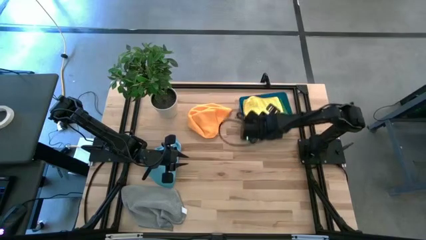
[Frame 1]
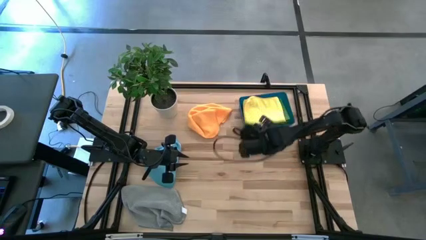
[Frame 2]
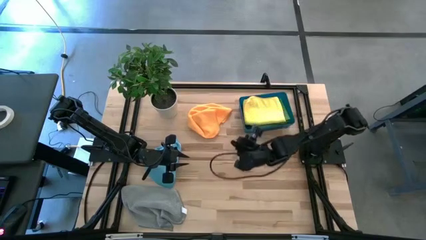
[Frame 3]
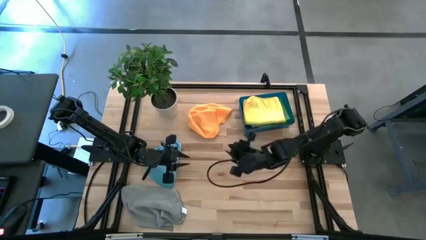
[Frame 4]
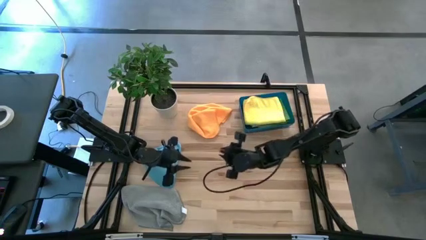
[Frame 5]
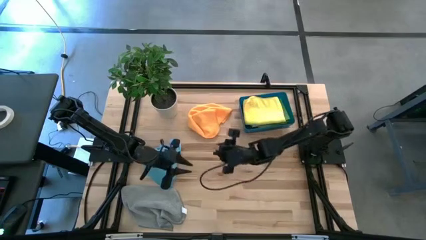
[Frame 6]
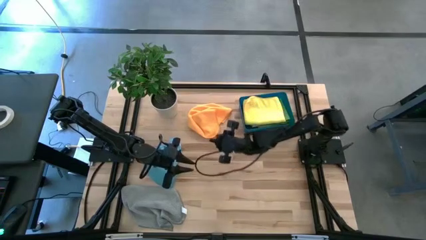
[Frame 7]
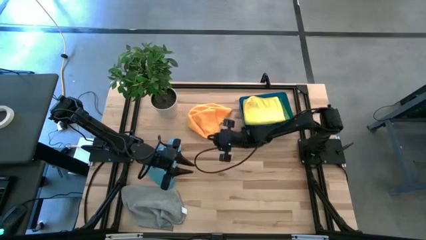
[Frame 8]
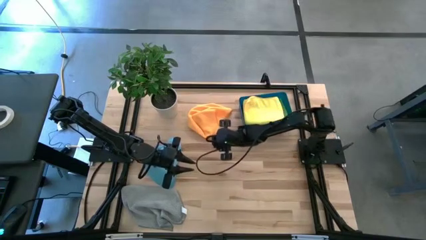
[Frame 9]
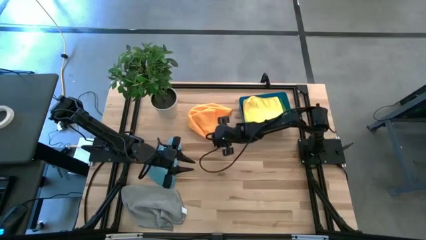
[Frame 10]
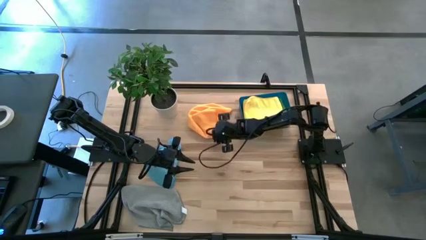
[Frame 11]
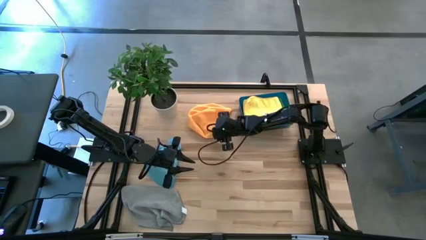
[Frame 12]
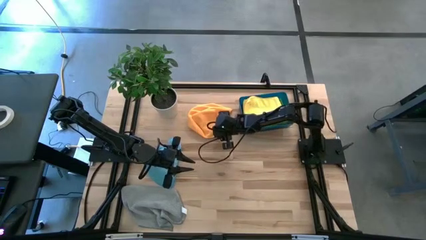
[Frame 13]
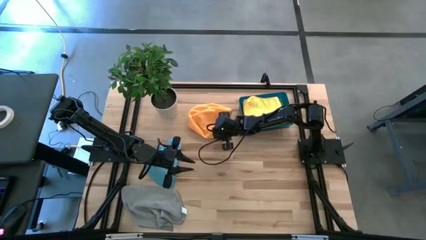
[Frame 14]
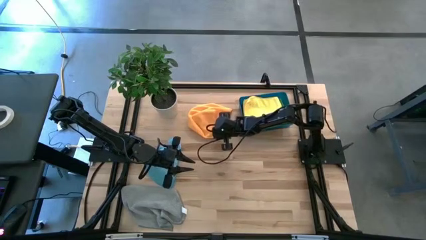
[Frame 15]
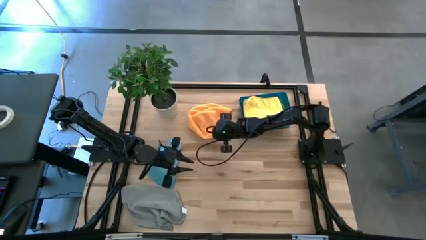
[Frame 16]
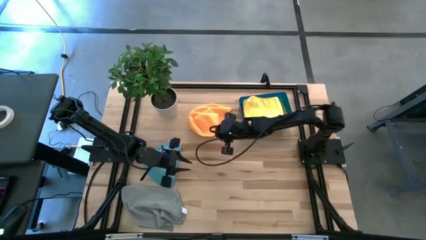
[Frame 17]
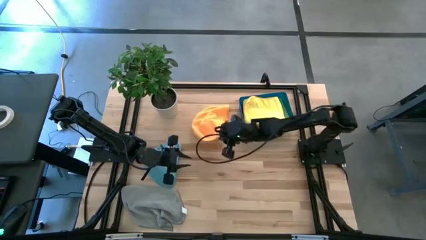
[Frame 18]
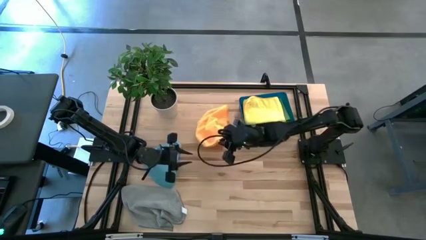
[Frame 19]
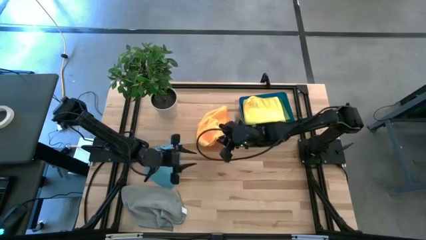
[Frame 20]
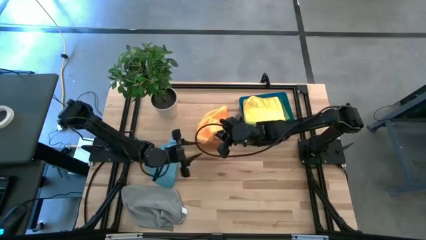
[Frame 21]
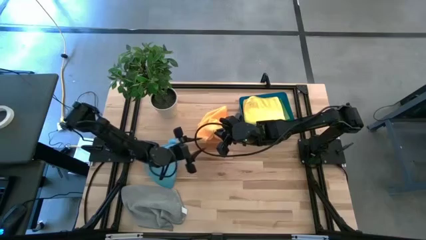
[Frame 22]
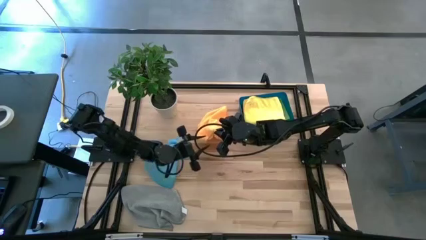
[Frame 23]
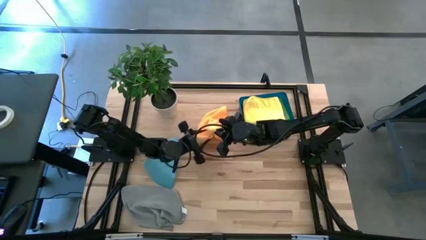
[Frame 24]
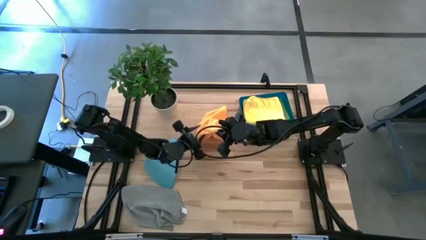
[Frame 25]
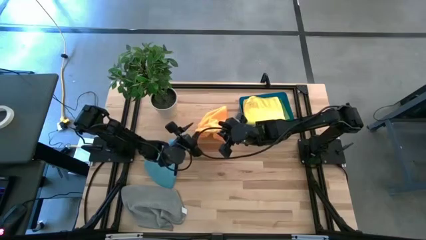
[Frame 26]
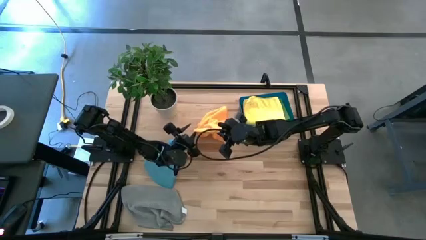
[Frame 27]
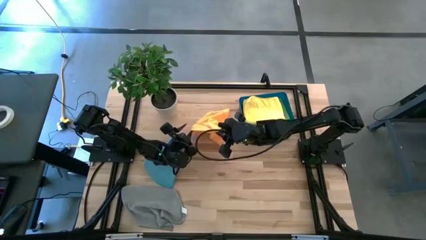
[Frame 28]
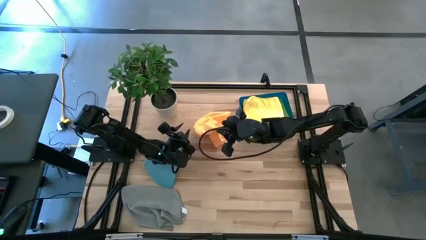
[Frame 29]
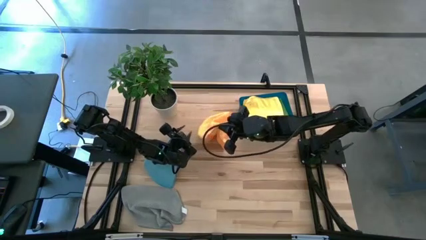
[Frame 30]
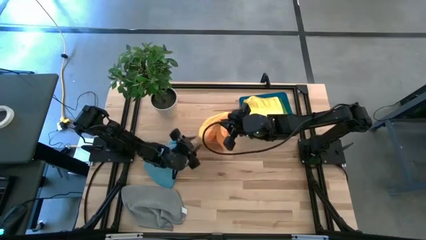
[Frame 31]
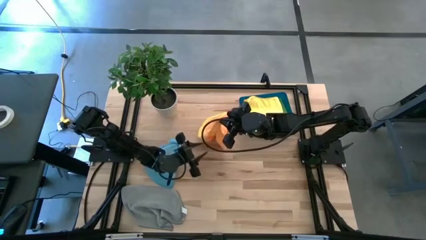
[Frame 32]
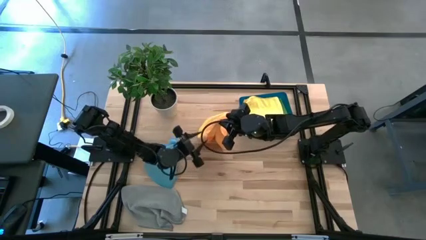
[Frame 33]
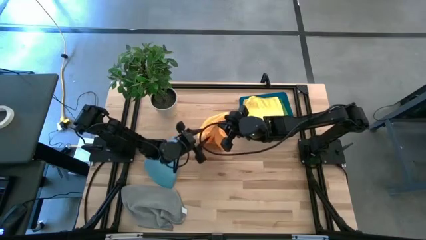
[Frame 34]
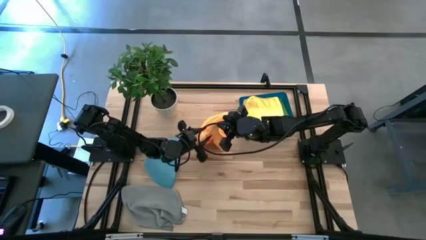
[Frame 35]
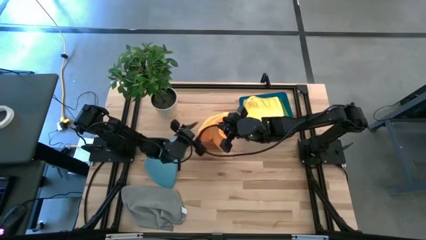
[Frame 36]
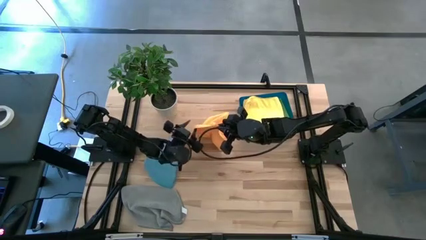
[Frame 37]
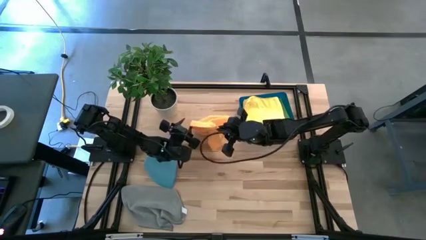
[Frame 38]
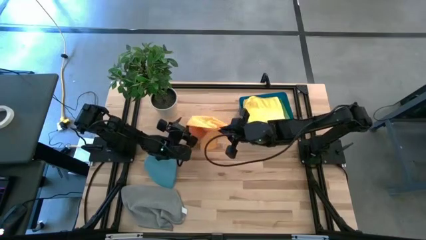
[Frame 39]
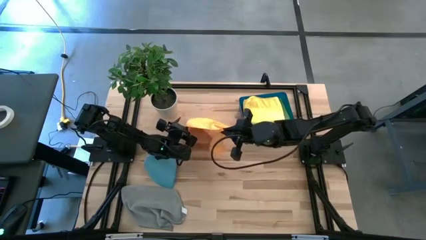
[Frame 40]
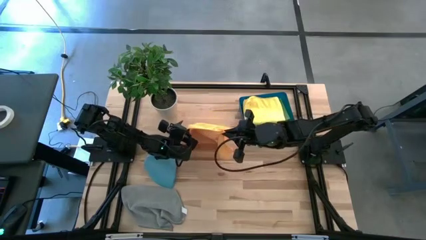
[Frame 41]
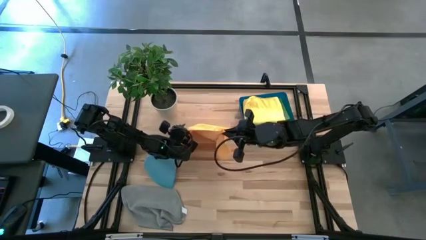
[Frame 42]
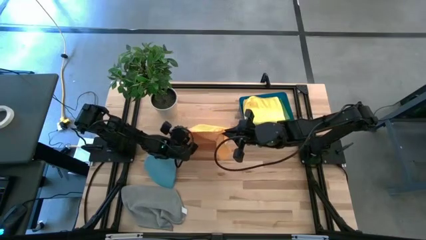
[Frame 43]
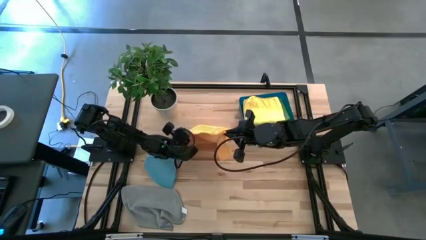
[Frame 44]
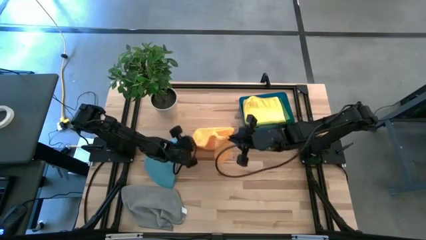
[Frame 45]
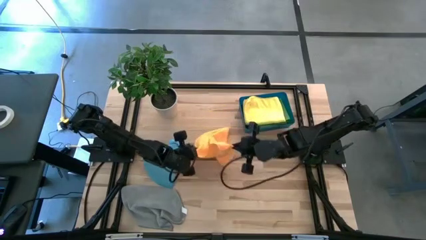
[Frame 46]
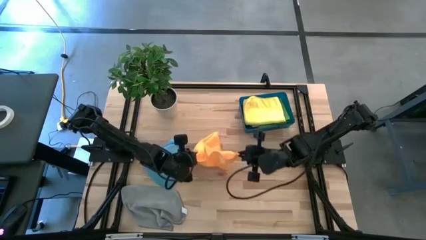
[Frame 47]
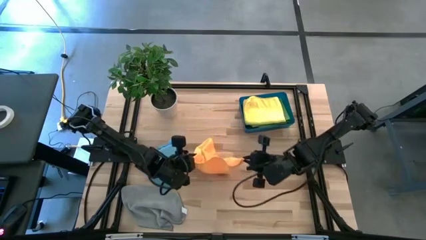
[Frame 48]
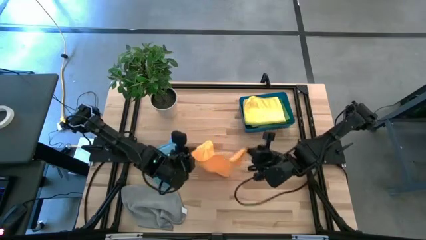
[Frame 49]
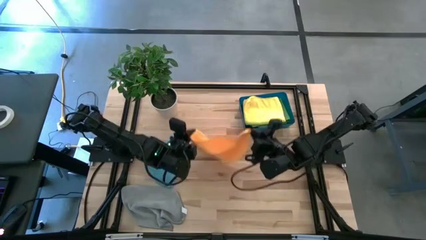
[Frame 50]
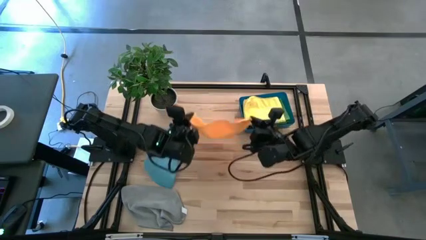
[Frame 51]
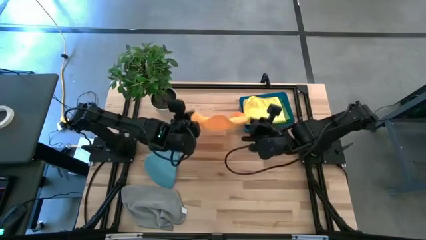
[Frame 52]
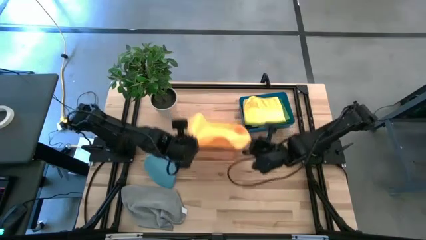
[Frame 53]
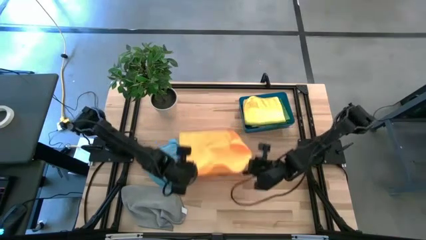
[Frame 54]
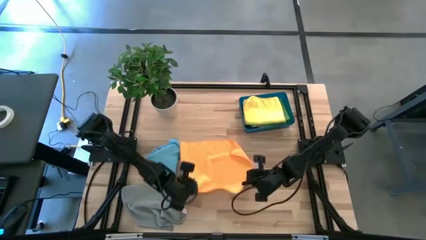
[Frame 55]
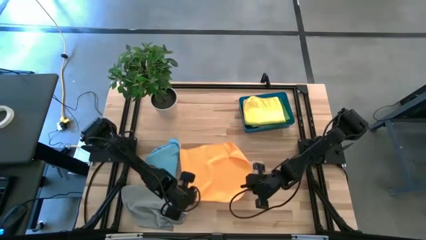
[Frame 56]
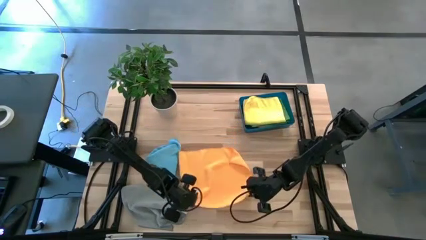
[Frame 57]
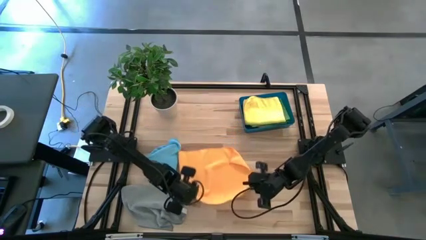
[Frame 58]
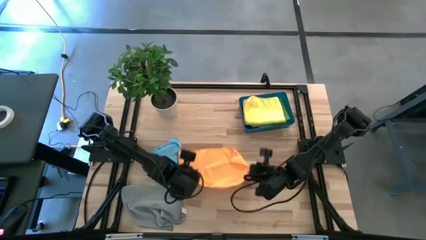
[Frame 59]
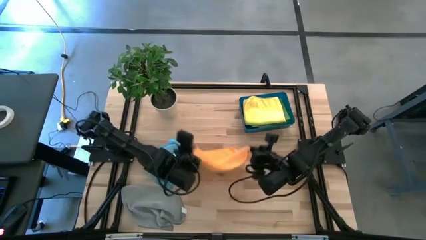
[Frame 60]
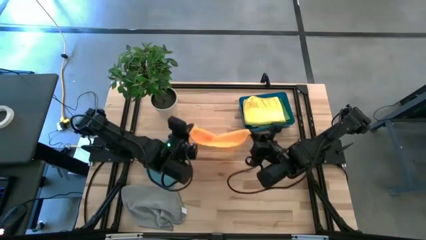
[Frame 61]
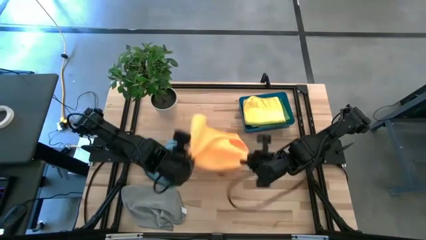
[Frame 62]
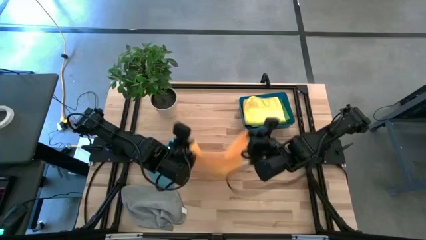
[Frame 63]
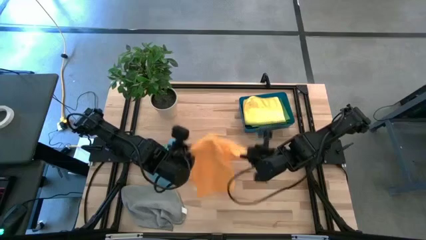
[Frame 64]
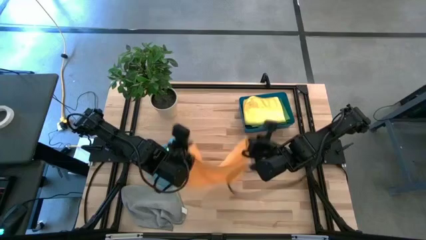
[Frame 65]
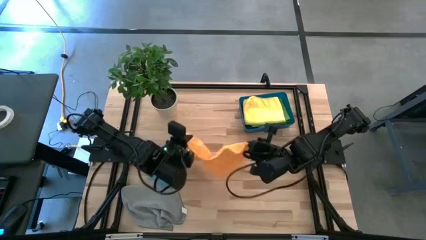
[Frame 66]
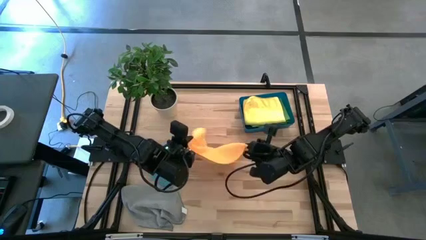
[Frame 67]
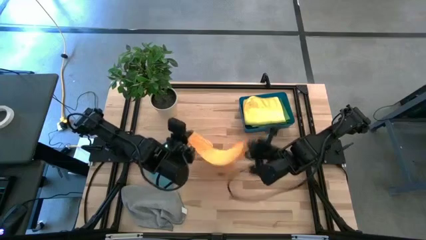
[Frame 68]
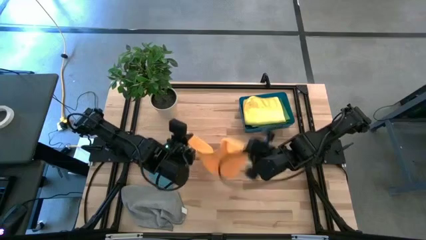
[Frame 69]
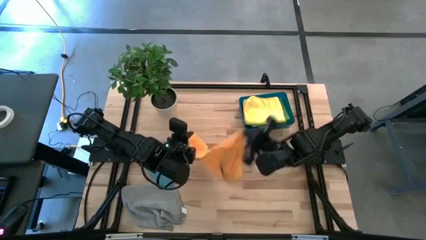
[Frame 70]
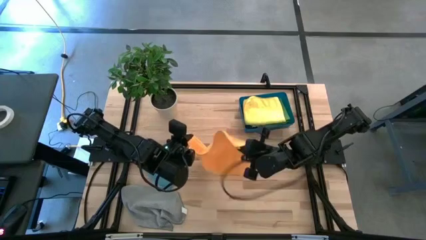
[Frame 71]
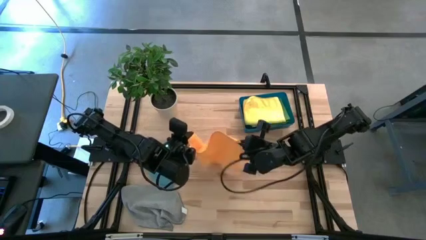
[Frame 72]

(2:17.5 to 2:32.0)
Task: Fold microfiber towels
Fold the orange microfiber cloth

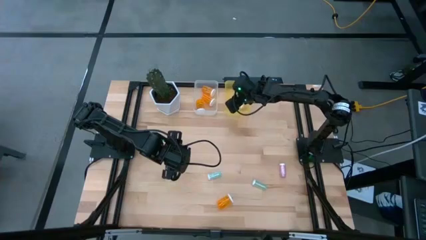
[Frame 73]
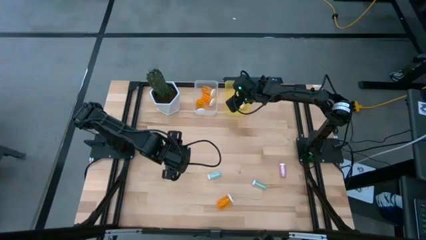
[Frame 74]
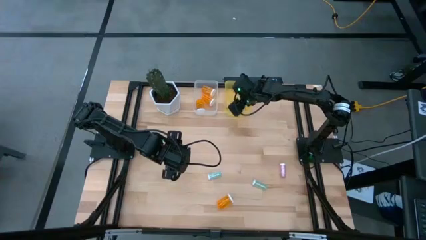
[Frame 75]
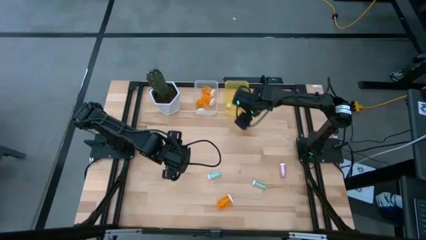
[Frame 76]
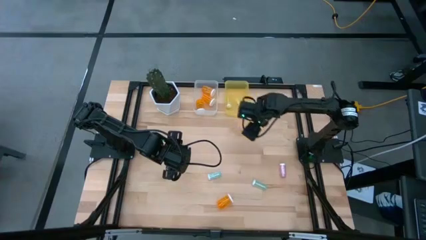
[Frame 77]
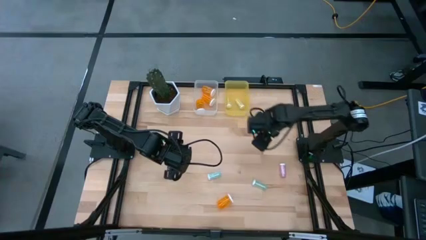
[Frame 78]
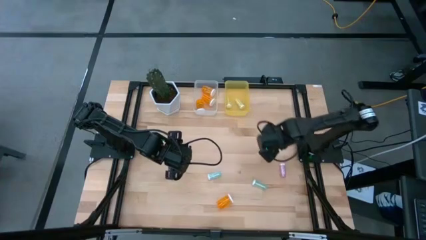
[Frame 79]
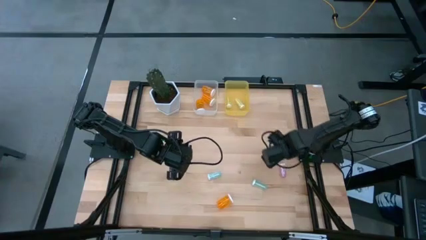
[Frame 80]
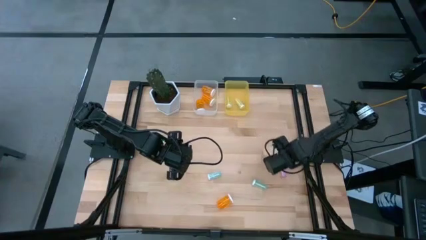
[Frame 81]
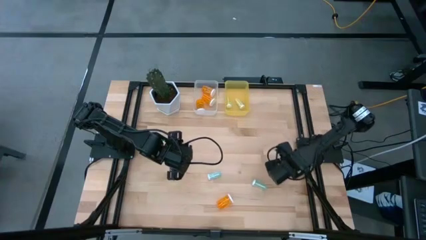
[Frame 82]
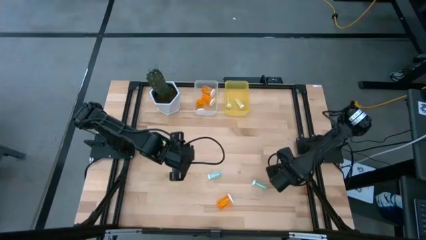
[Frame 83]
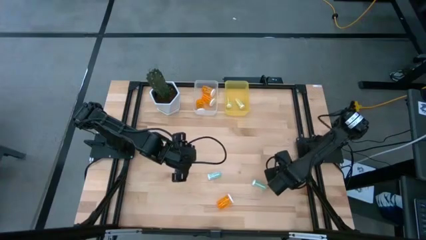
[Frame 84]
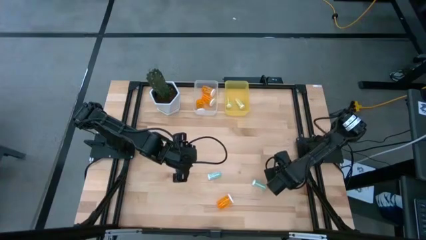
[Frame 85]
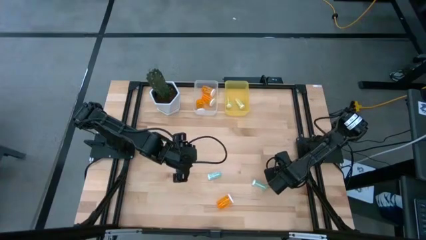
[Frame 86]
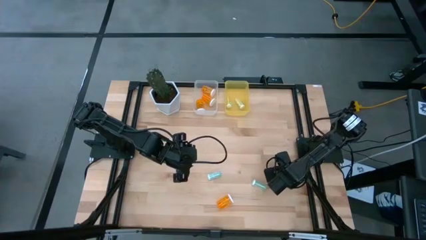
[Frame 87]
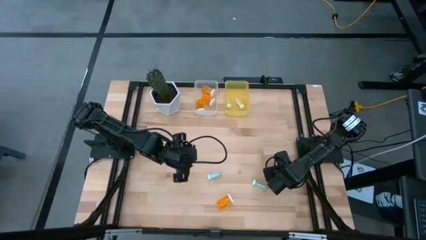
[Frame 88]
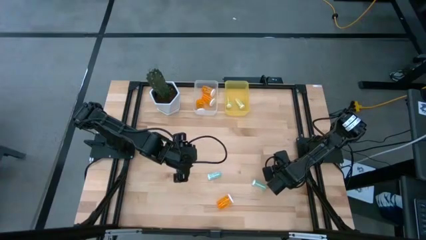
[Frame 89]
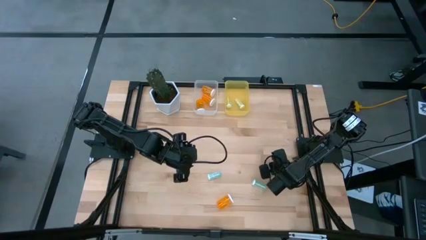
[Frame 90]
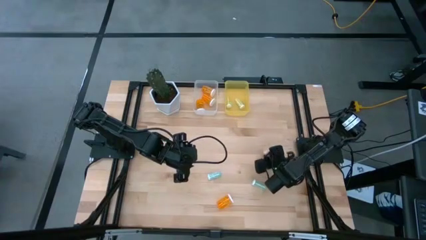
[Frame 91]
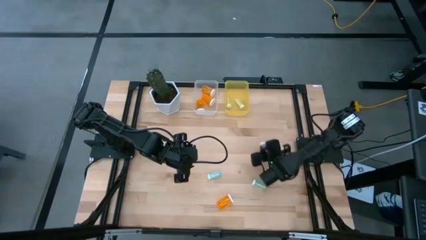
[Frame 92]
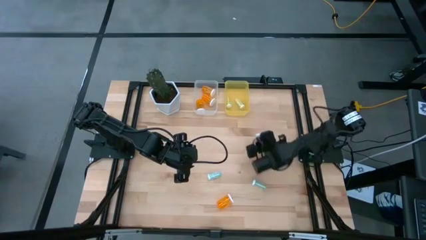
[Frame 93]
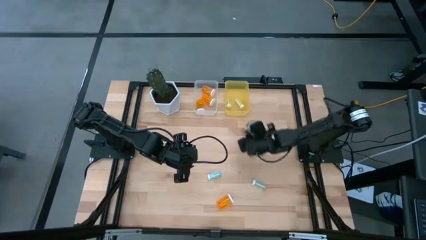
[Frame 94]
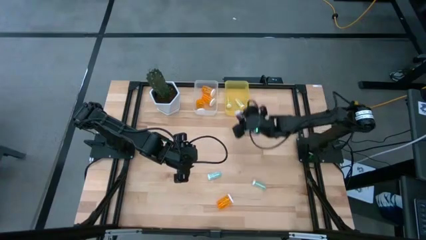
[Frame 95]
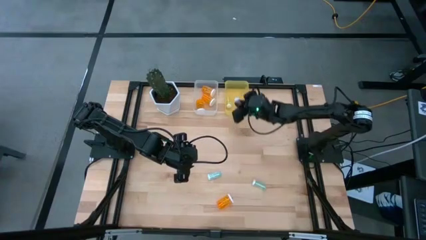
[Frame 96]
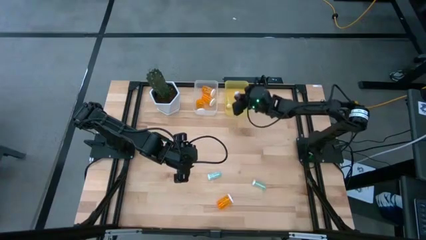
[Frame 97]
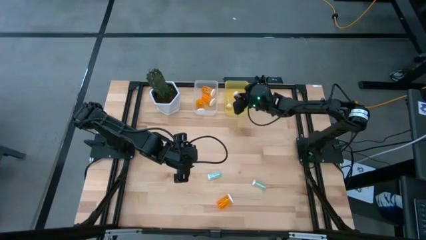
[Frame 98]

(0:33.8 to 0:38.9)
Task: Pick and place medicine bottles into bin by pill shape (circle, oval)
Put the pink pill bottle into the yellow bin
